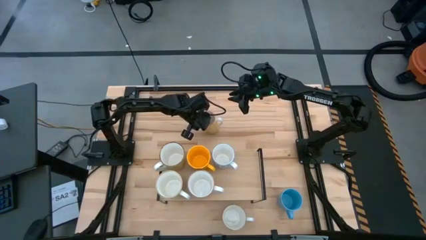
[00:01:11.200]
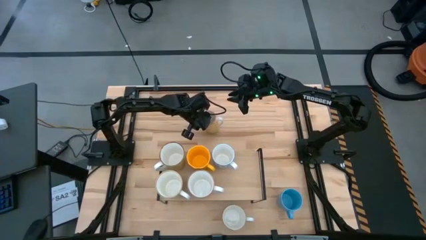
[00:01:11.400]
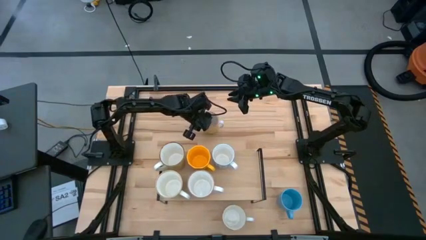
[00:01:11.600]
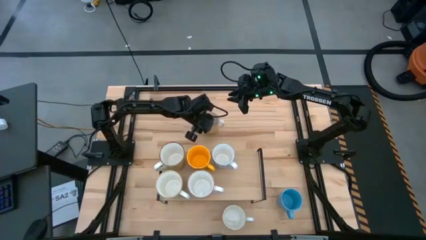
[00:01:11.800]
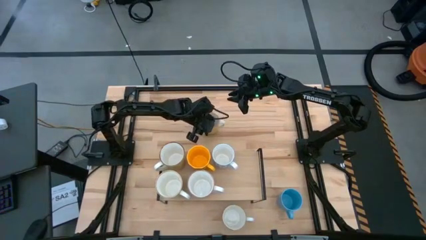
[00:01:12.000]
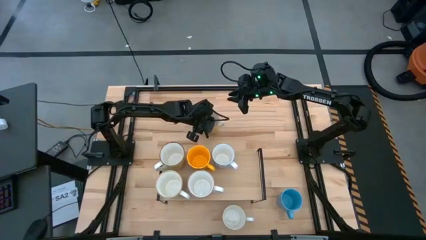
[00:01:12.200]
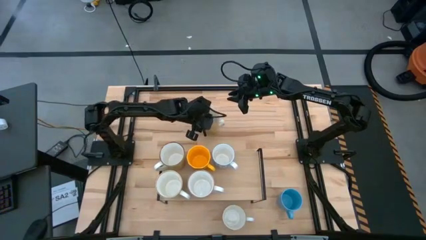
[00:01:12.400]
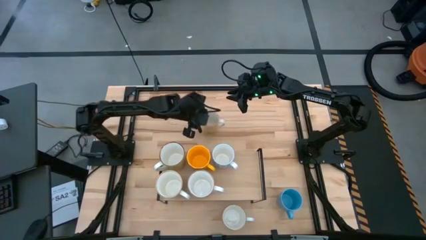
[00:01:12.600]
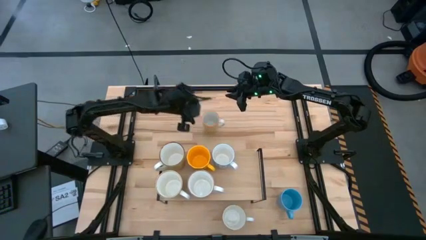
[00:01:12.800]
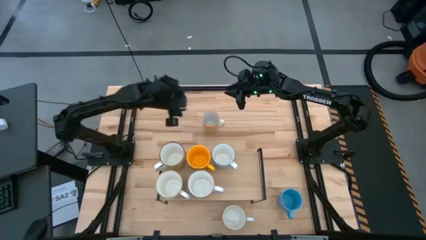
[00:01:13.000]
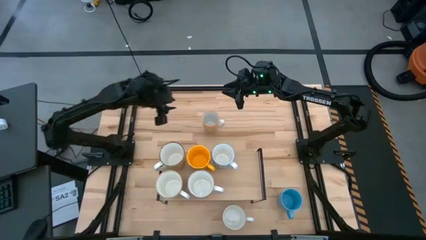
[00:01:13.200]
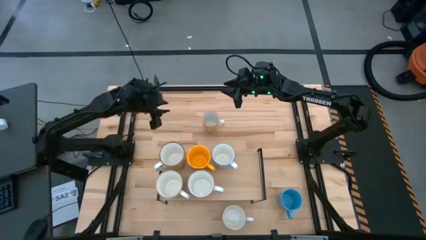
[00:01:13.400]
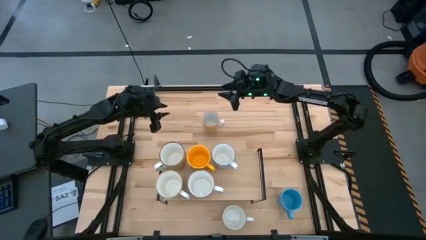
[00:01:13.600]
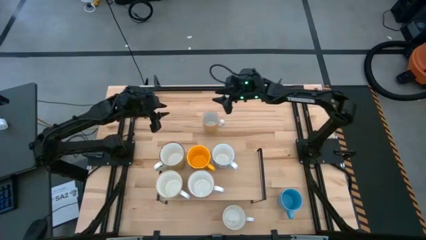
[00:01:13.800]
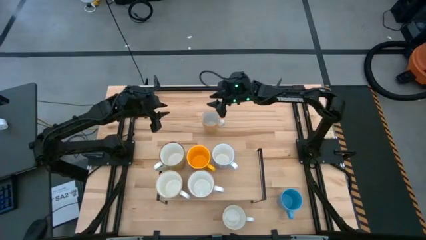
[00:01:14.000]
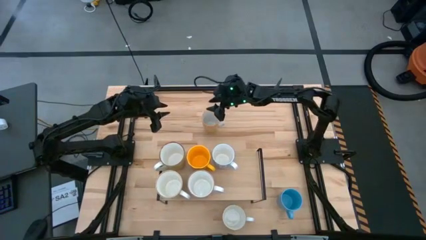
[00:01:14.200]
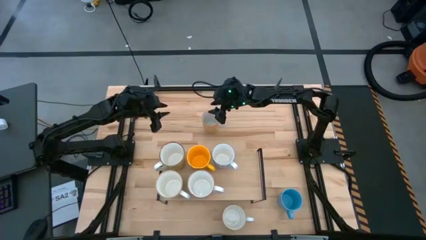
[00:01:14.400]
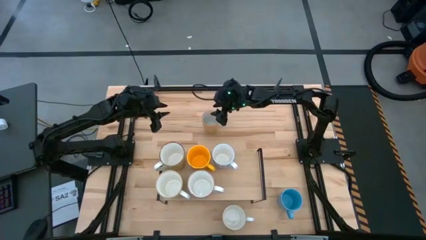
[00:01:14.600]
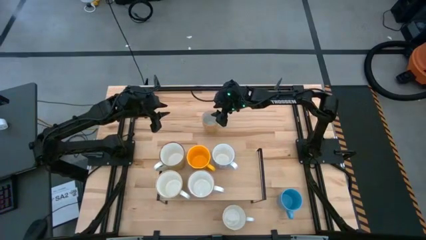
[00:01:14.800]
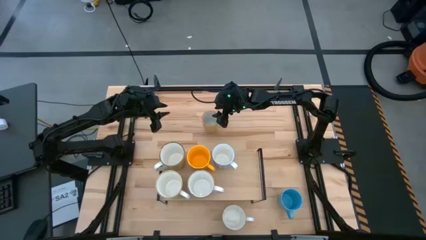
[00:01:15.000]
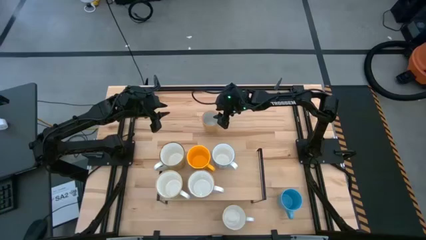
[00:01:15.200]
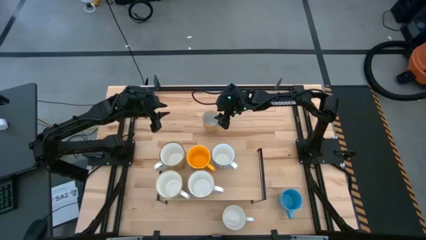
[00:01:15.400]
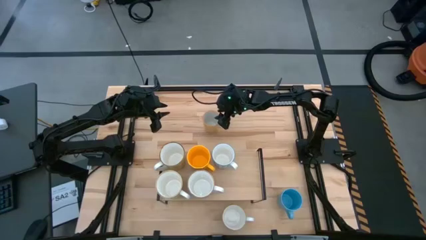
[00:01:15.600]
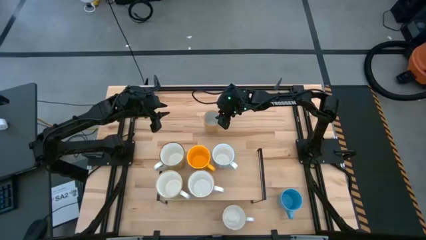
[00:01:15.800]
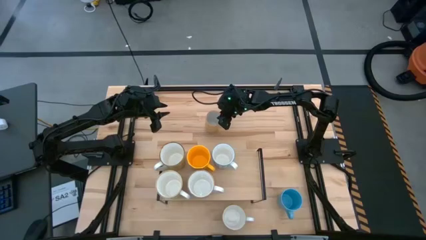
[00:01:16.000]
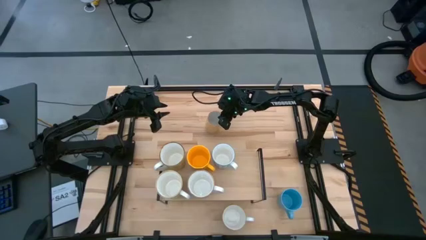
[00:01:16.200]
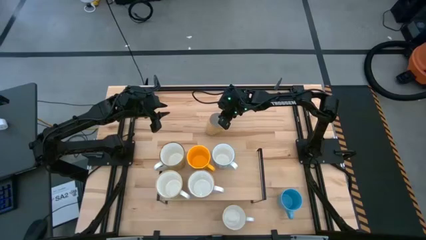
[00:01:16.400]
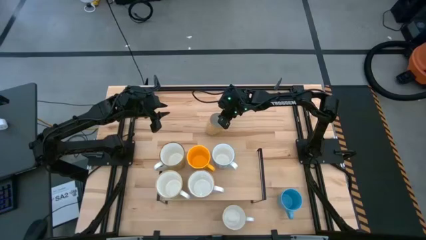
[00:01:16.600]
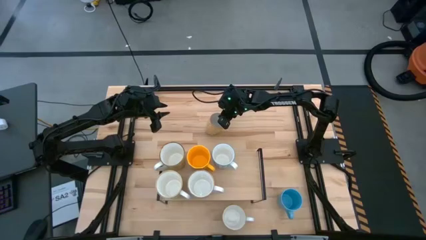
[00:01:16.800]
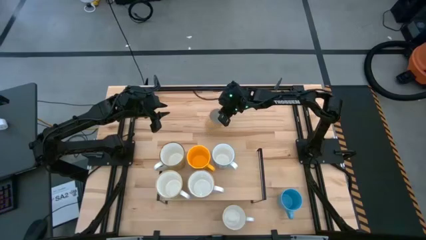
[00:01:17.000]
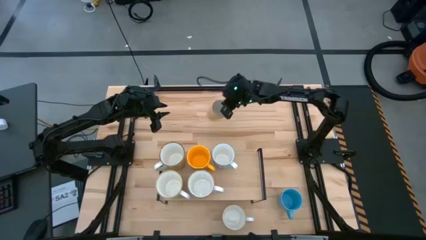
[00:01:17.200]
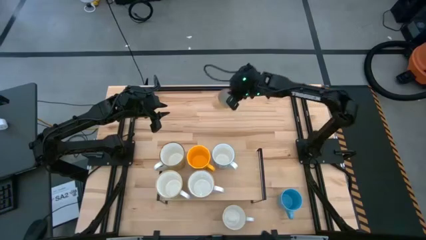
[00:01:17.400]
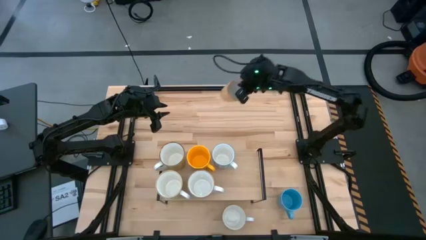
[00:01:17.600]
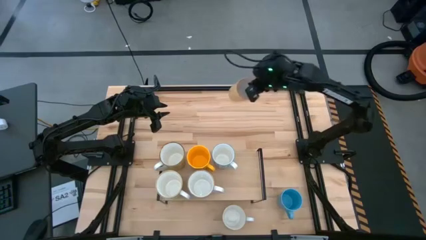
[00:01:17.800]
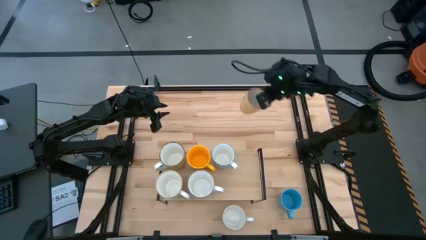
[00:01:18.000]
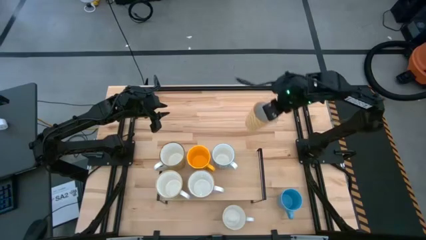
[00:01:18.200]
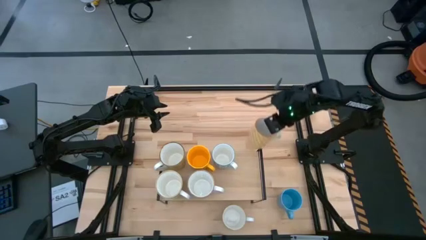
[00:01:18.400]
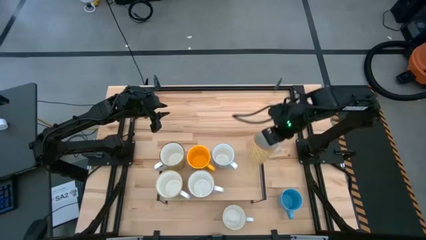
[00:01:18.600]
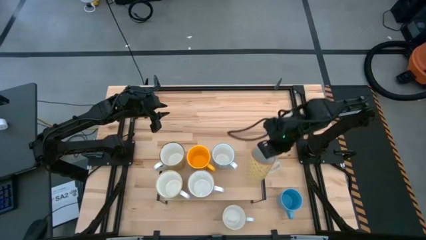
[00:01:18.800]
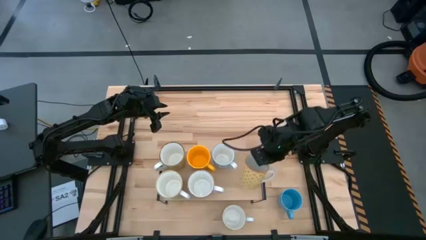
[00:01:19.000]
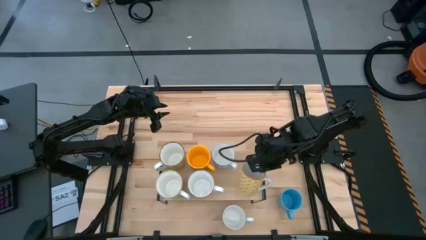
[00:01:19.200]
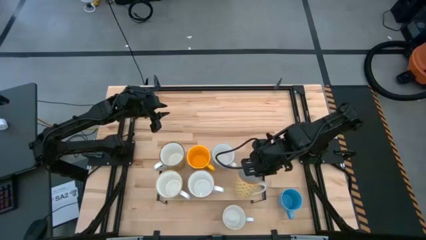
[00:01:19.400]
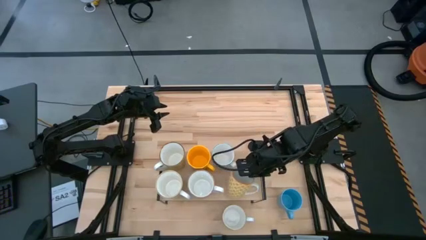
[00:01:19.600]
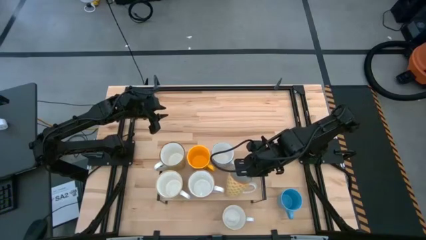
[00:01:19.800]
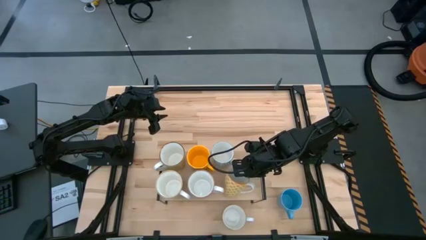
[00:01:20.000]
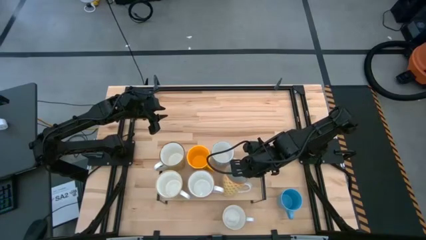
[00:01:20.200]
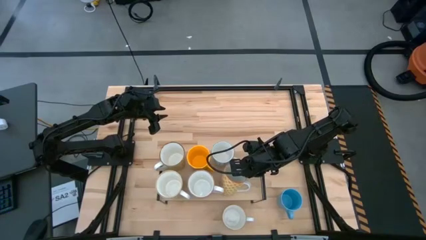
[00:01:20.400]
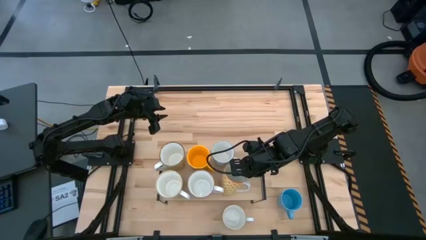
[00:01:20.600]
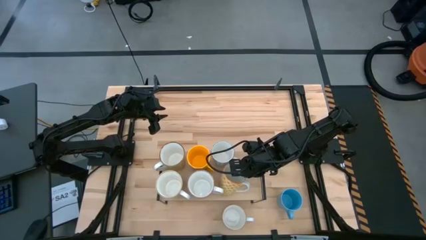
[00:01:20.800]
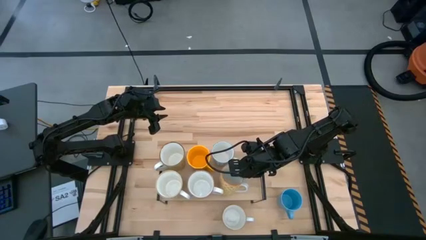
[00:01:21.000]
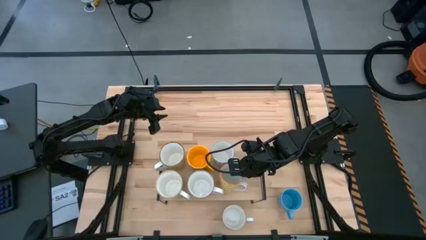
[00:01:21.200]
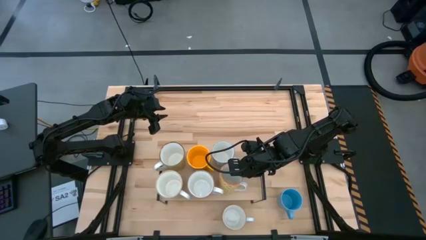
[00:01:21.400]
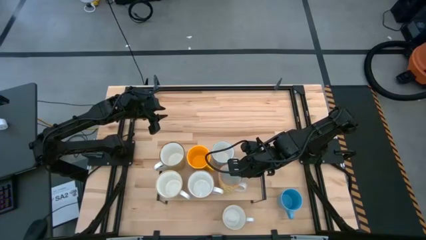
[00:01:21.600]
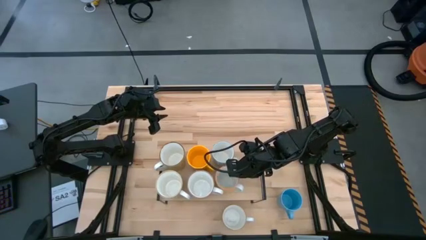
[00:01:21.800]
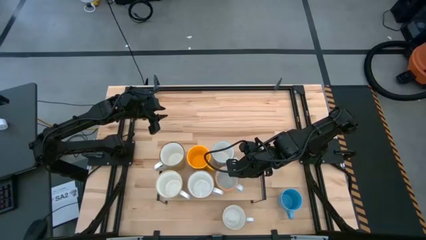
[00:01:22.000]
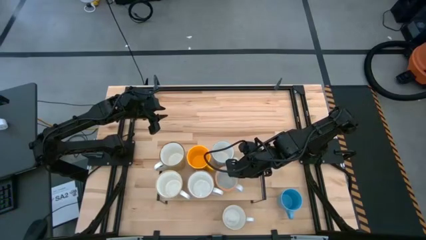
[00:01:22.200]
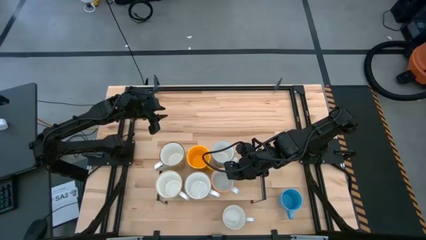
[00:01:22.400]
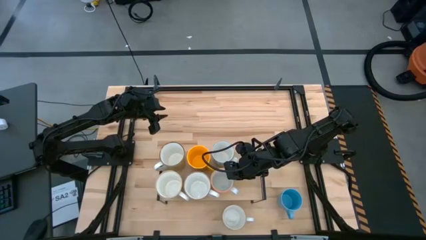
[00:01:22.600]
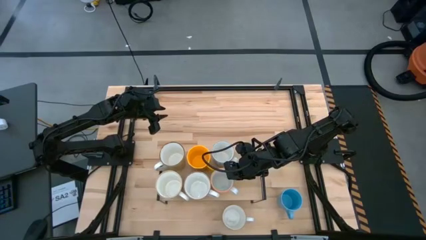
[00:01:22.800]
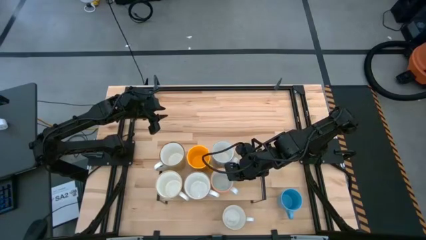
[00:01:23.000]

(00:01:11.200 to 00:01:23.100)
Task: Place coffee mugs
Put the yellow patterned mug on the shelf

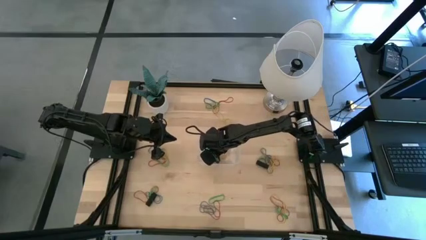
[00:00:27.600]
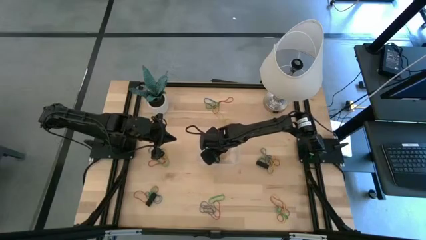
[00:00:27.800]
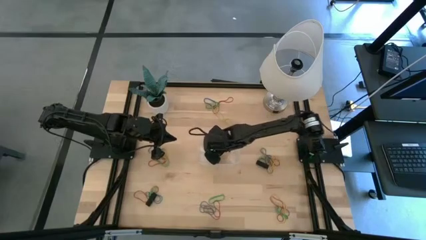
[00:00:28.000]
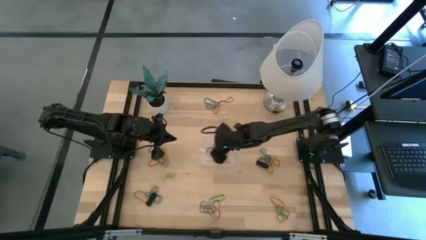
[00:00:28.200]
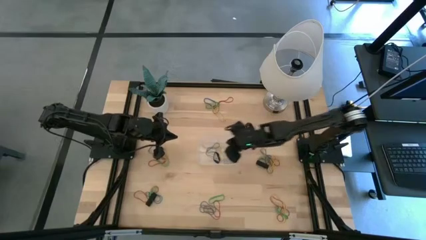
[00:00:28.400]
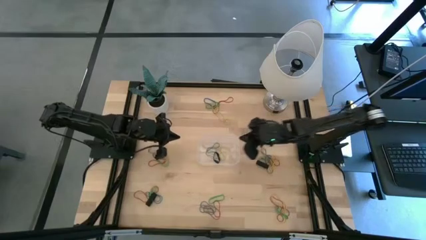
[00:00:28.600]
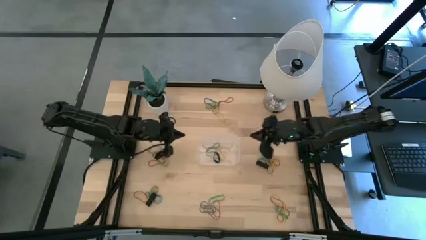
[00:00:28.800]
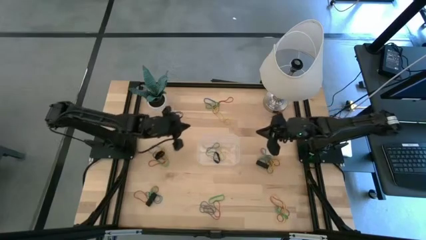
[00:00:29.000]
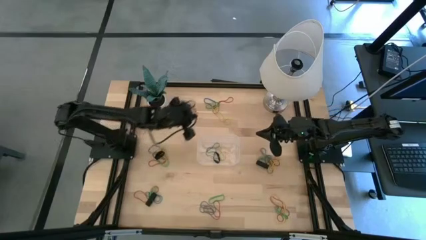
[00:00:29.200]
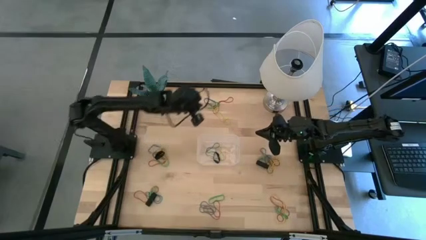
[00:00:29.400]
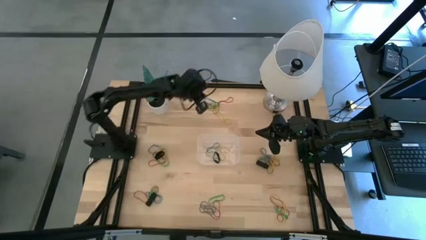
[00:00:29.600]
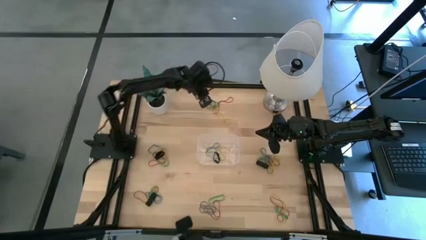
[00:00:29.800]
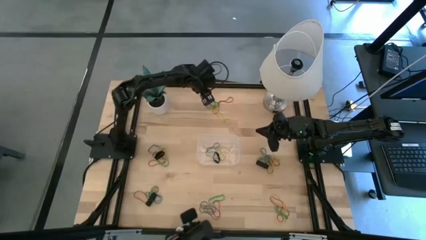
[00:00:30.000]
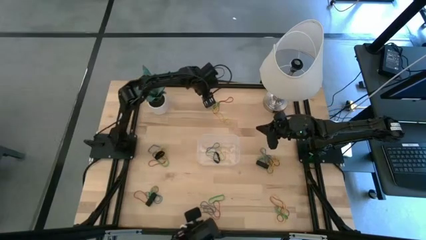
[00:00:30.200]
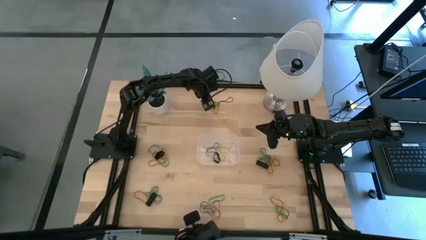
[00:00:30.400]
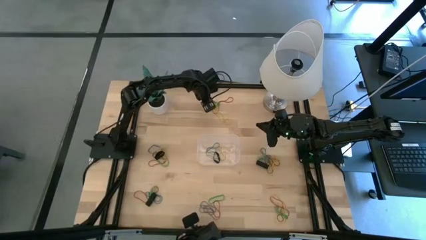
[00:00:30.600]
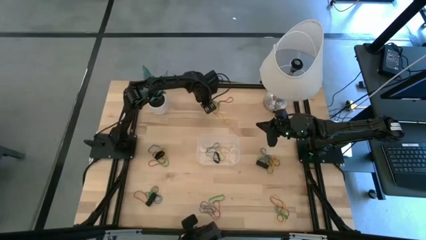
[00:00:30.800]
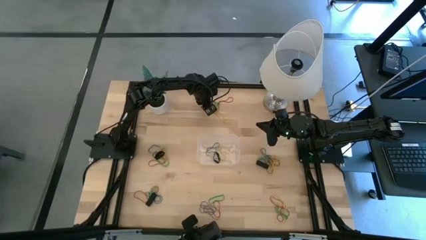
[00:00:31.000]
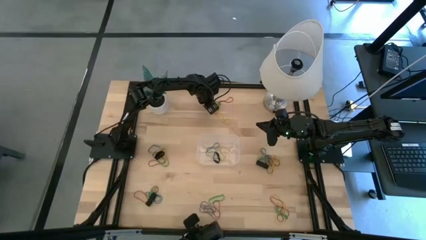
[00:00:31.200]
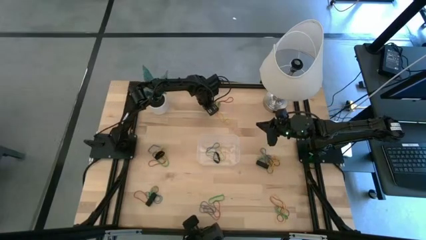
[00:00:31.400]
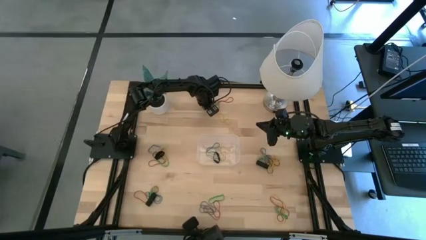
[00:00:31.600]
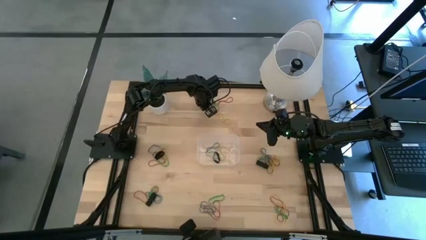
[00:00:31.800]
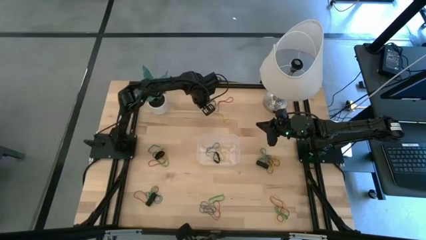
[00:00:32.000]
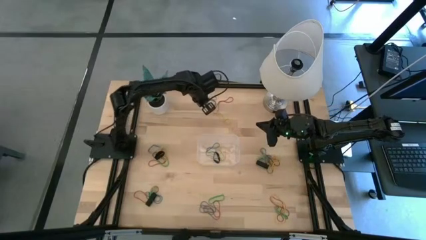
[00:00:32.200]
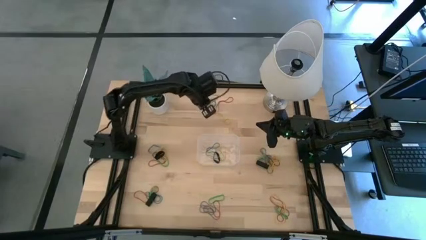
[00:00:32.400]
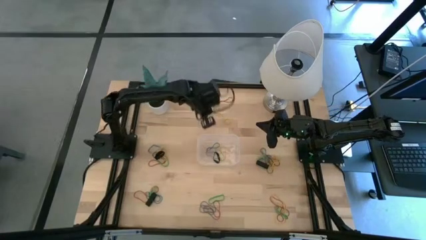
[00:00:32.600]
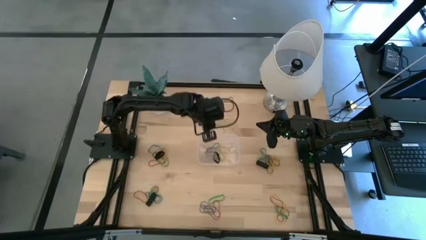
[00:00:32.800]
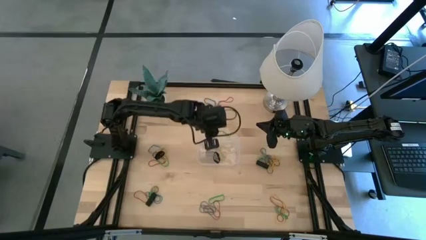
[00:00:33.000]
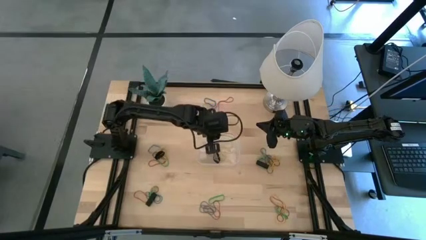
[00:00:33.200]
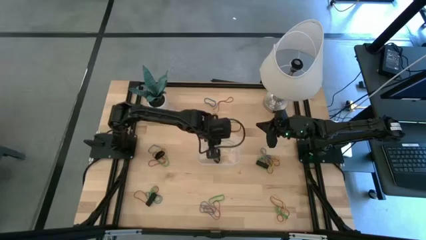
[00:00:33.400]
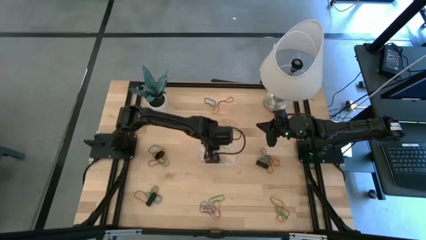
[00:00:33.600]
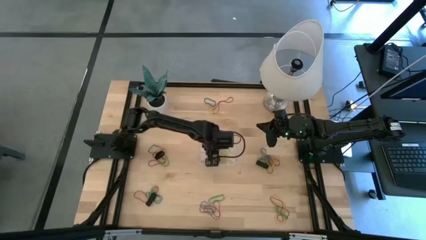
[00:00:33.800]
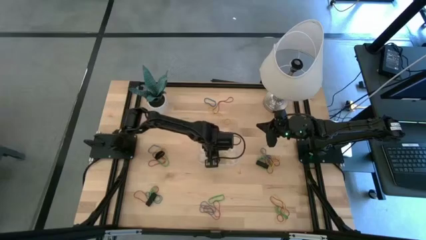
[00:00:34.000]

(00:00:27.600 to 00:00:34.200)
Task: Pick and place rubber bands into bin
Put the green rubber band into the transparent bin
